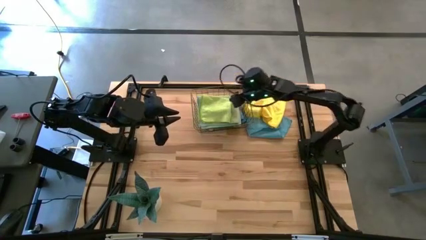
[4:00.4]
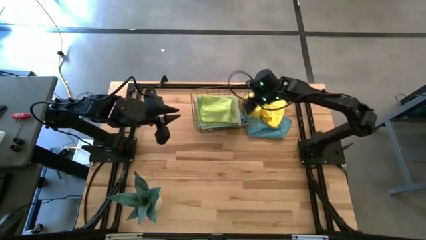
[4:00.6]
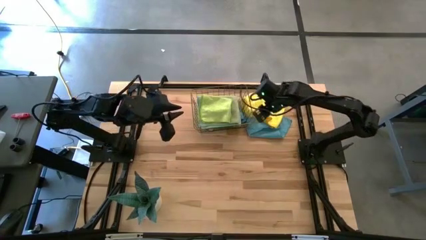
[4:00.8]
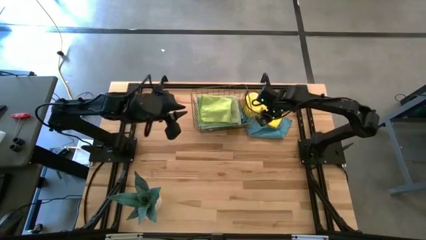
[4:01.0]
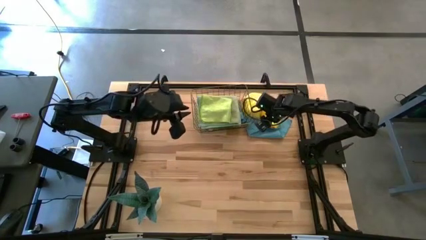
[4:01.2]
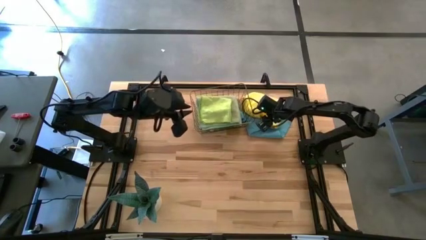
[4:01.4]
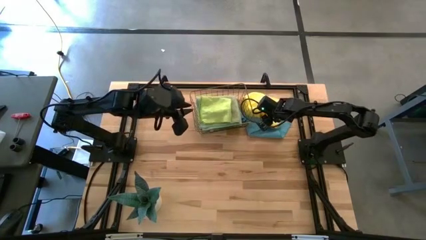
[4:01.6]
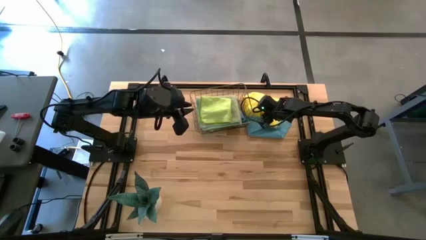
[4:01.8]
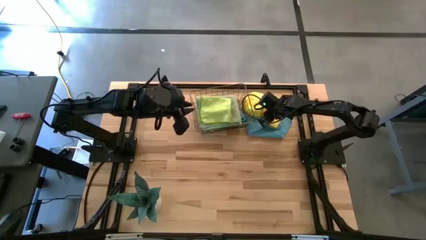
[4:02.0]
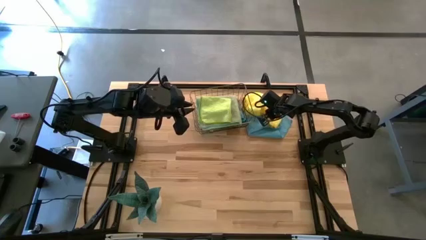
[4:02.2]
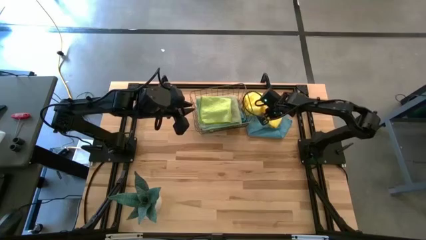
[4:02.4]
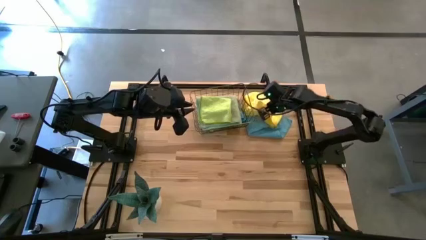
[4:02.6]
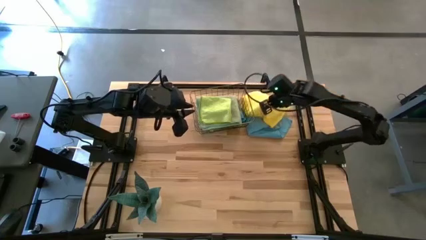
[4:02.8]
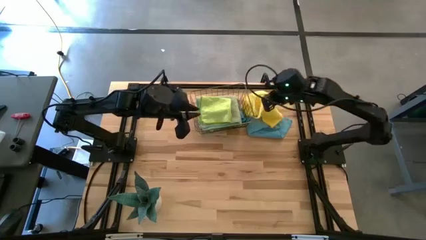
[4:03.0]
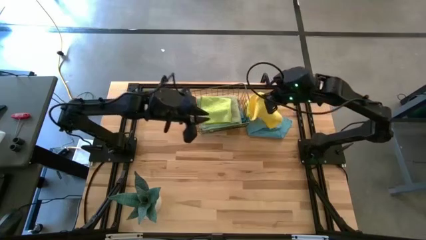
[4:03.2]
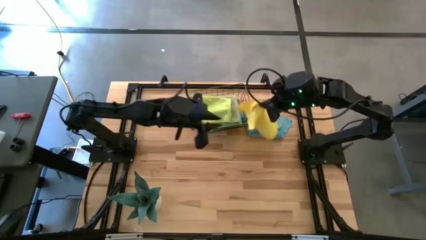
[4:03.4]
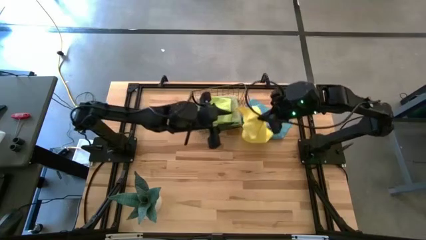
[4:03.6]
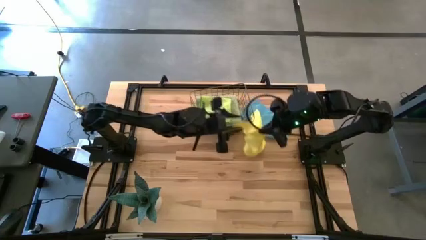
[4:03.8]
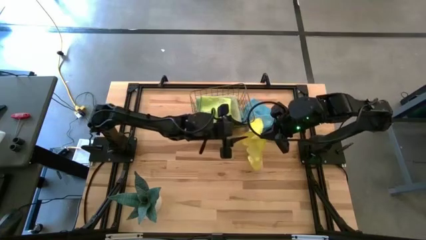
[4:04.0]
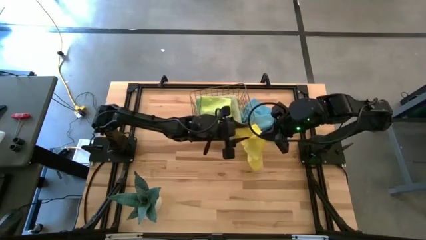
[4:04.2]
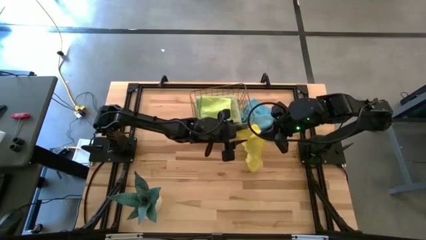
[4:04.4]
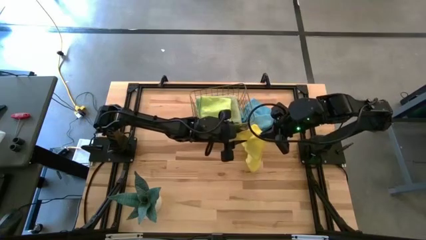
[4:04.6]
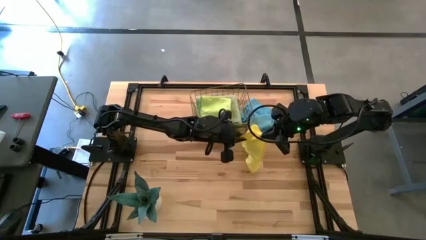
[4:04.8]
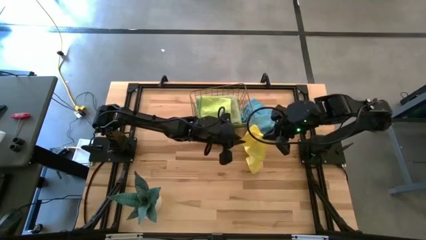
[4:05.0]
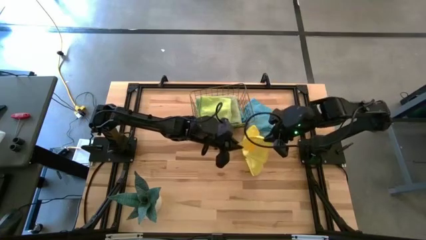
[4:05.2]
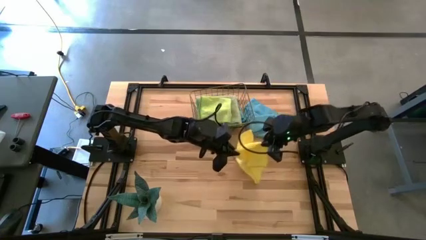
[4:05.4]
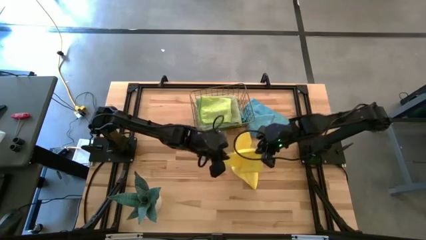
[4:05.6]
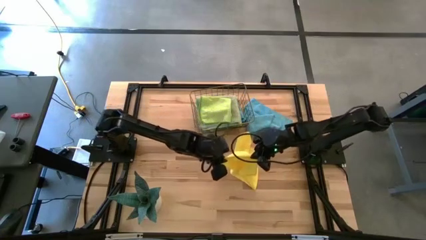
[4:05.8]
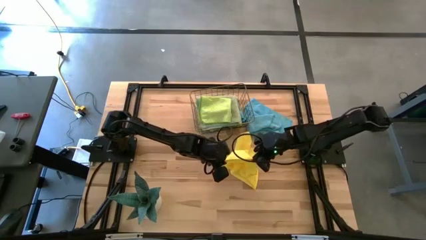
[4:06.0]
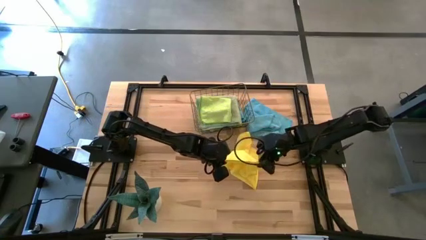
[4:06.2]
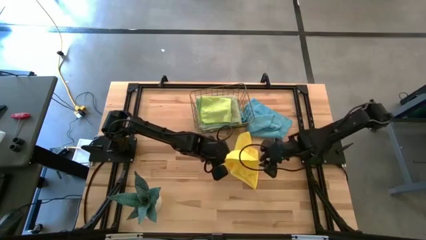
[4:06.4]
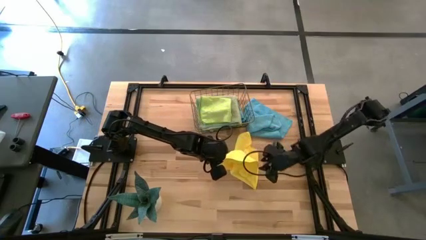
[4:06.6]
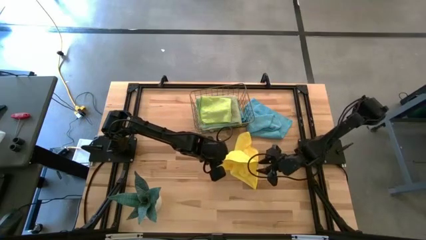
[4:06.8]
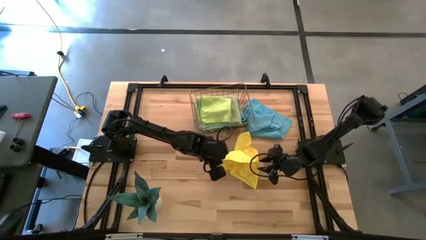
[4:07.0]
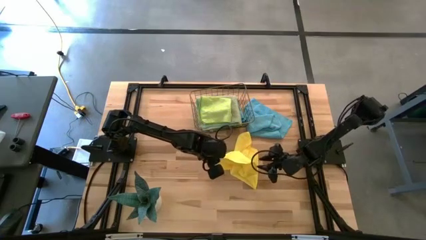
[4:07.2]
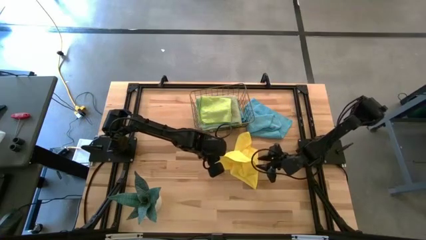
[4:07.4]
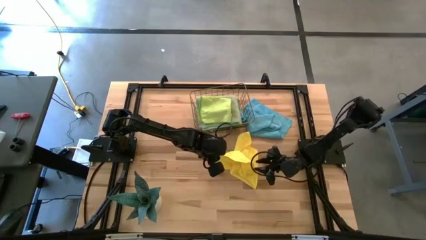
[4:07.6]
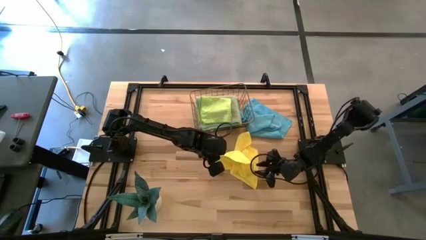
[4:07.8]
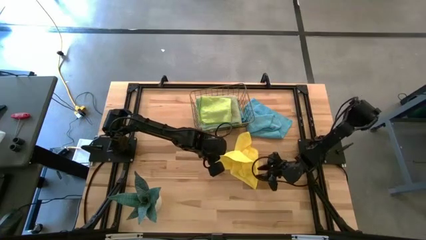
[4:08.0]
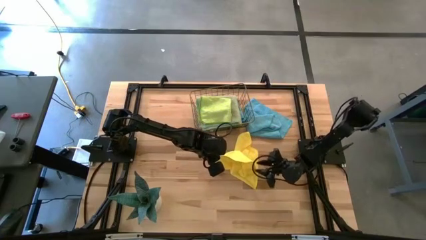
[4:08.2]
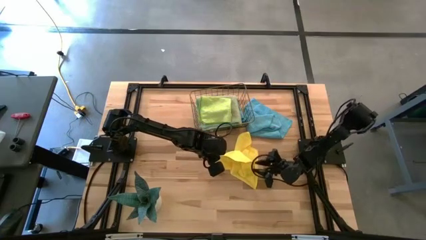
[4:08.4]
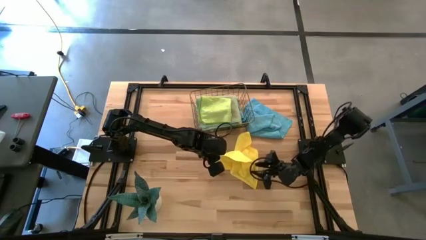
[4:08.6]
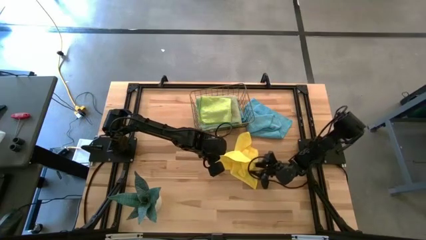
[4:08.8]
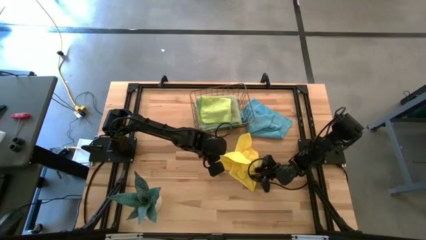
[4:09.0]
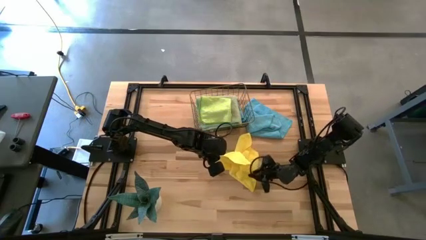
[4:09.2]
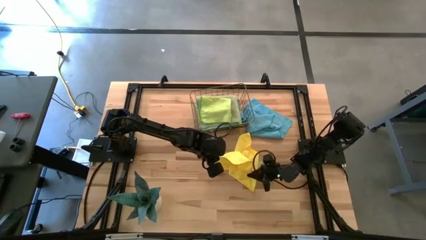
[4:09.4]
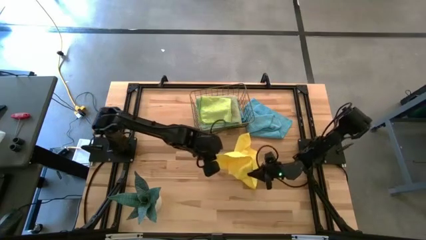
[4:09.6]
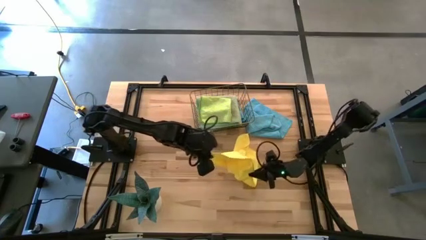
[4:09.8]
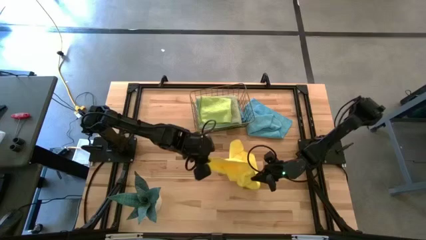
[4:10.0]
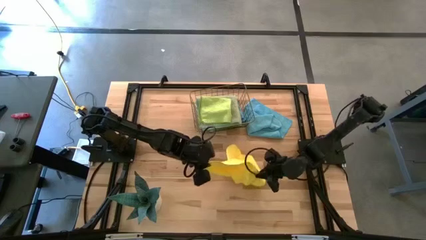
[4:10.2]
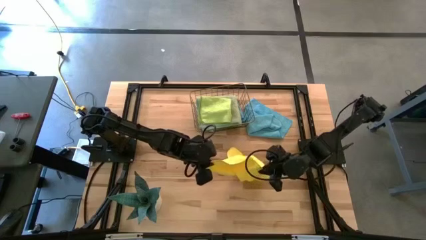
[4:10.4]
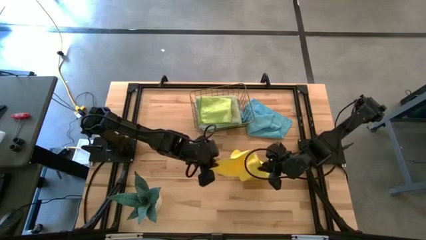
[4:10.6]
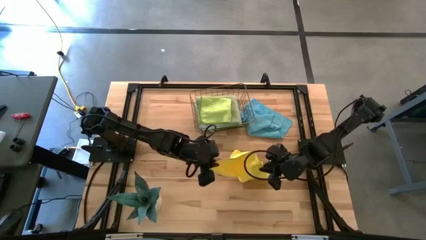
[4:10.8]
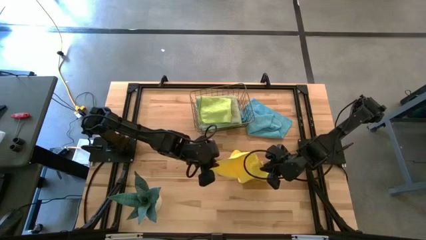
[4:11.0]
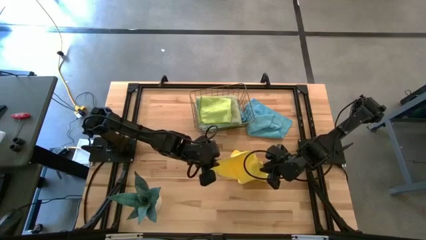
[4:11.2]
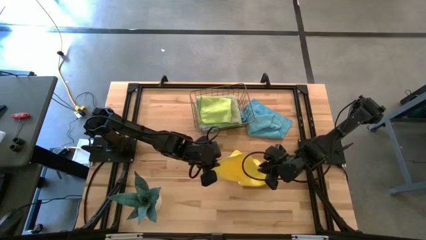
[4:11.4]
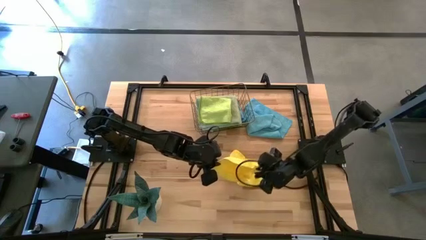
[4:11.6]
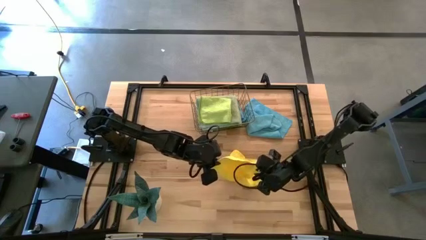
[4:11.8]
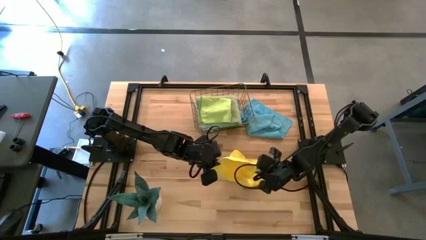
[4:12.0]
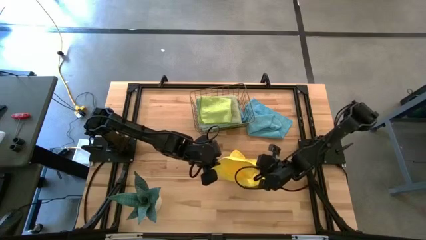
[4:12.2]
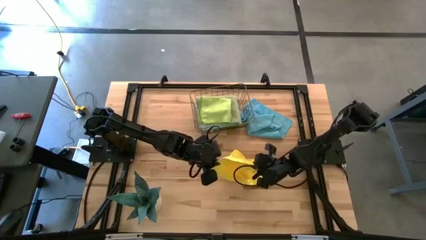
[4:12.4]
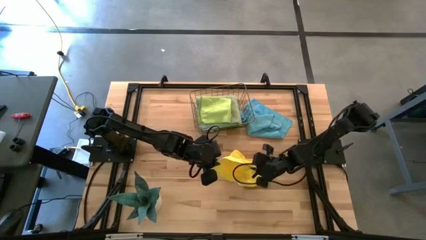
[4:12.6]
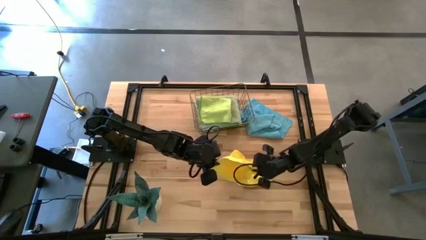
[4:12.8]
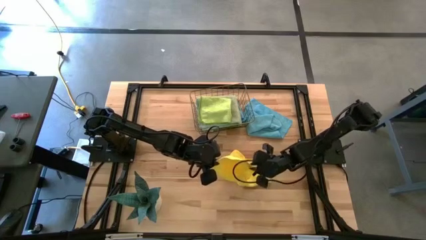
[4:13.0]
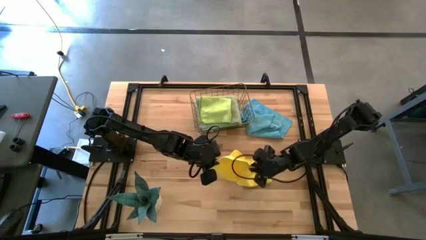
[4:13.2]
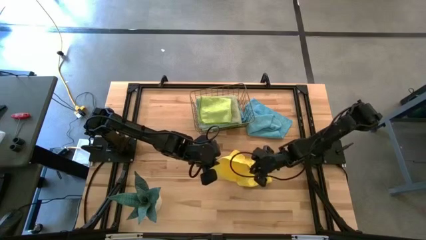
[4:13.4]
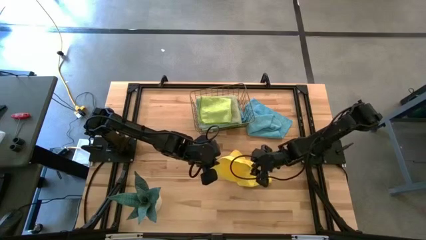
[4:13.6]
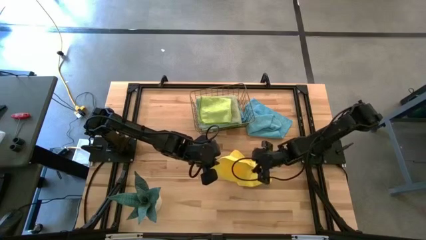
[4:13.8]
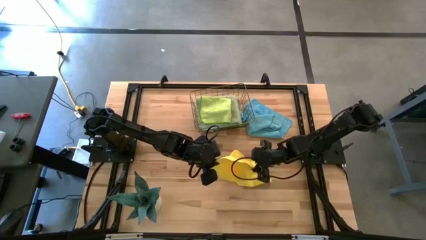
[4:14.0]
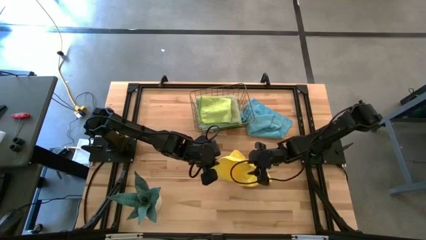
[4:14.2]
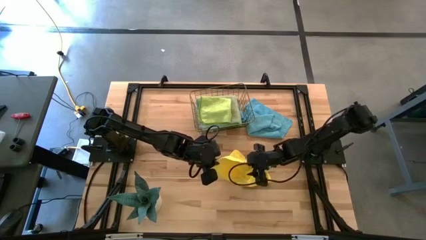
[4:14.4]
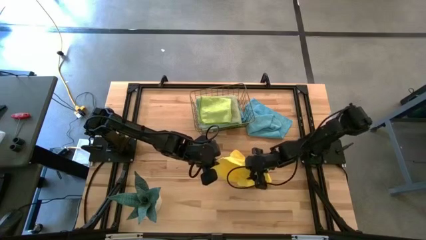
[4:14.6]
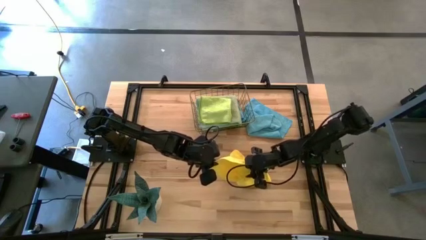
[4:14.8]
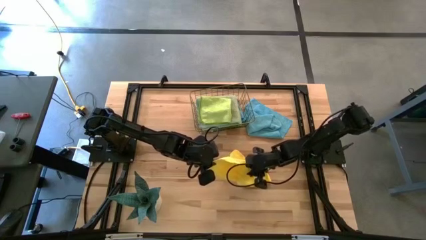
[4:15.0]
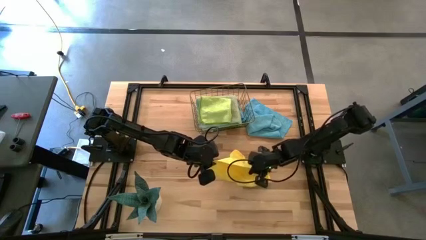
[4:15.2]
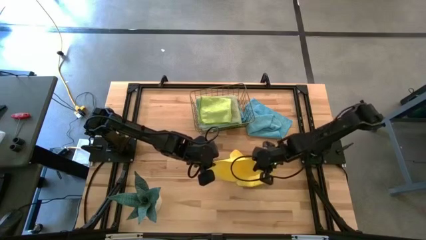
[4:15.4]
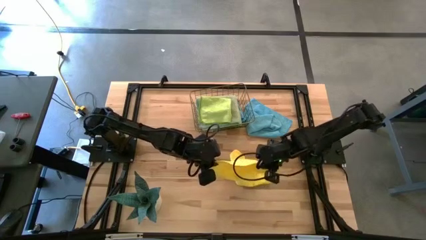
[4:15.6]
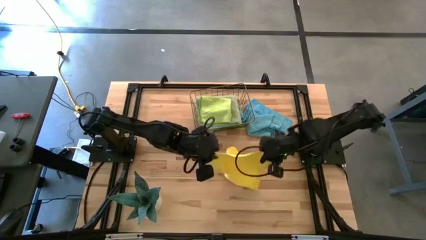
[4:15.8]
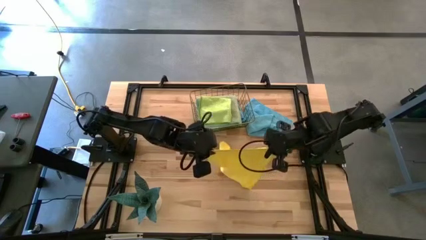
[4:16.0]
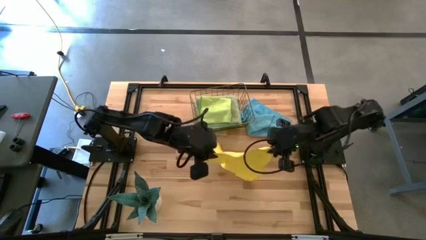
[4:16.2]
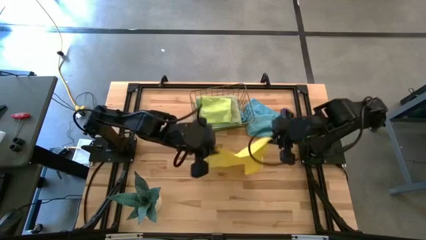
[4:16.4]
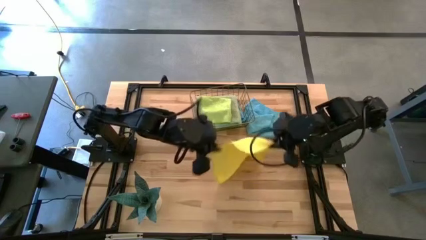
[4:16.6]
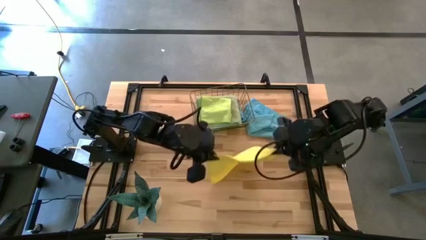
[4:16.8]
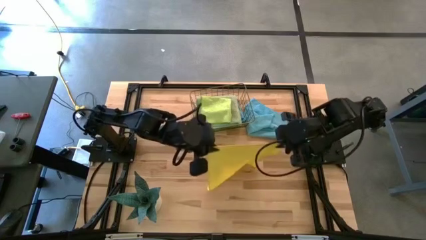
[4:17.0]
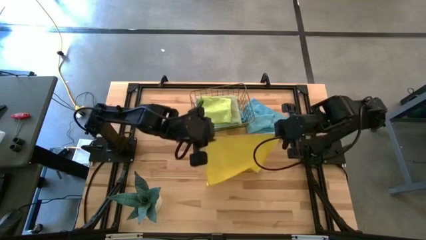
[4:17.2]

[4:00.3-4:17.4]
Task: Fold microfiber towels
Fold the yellow towel
